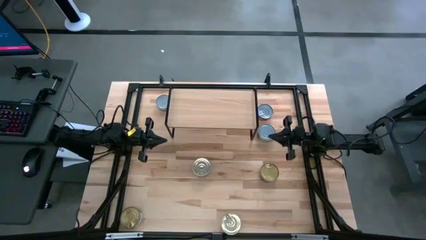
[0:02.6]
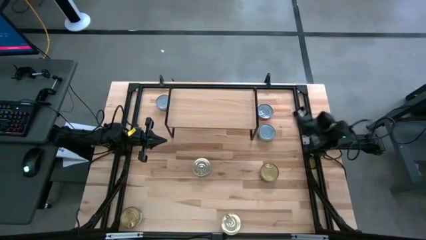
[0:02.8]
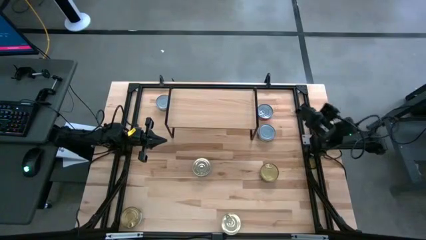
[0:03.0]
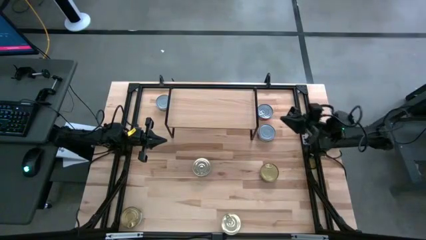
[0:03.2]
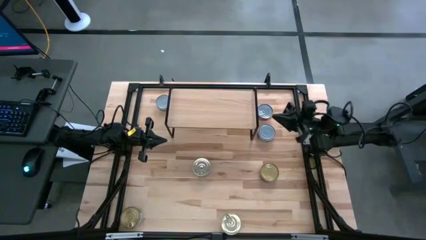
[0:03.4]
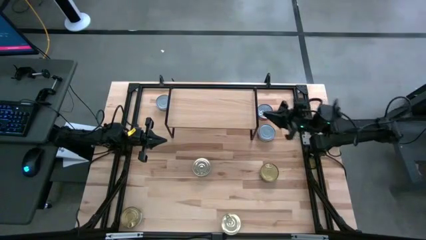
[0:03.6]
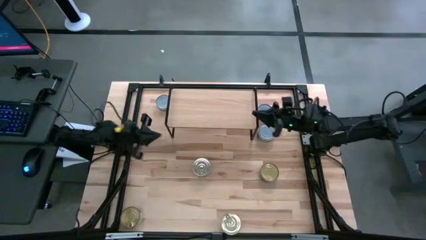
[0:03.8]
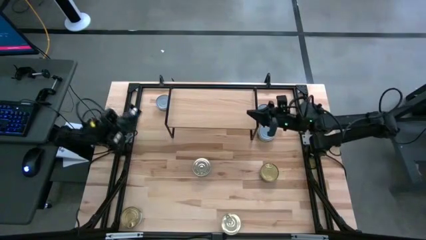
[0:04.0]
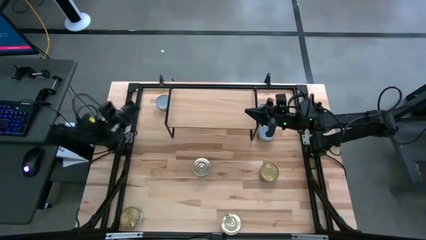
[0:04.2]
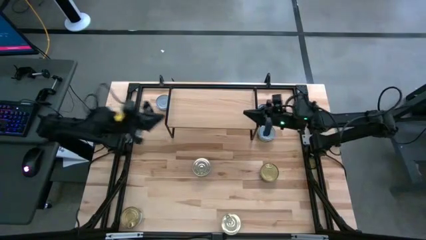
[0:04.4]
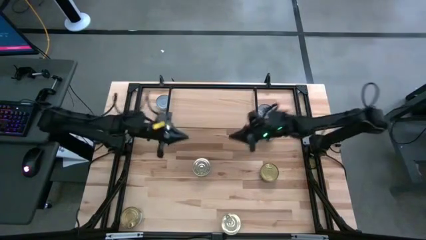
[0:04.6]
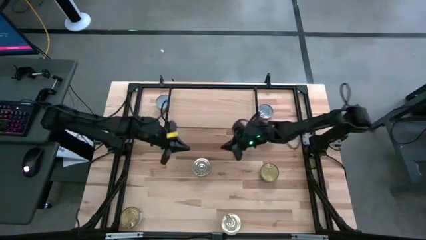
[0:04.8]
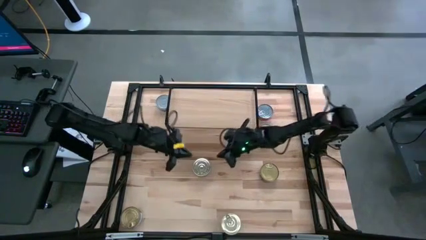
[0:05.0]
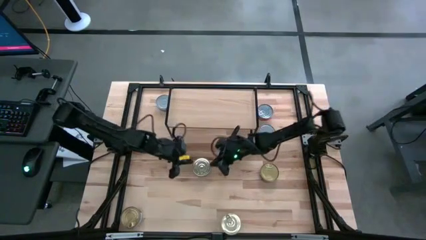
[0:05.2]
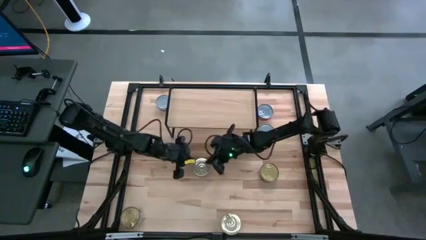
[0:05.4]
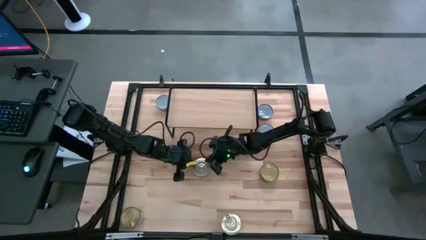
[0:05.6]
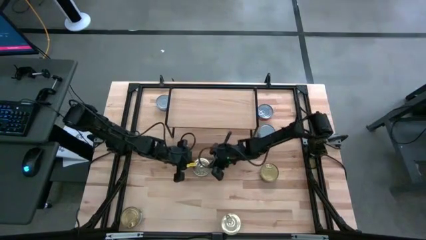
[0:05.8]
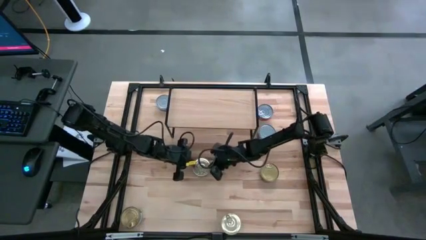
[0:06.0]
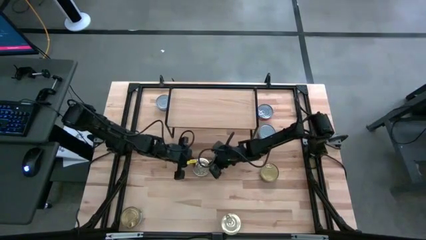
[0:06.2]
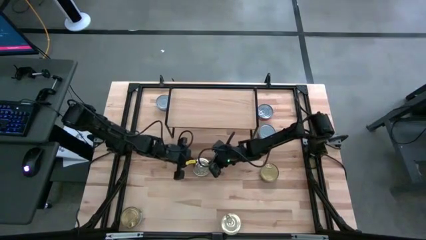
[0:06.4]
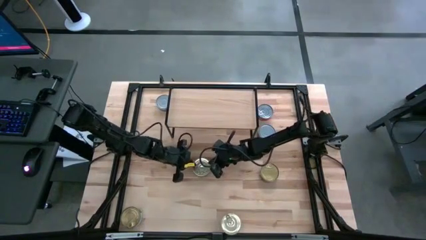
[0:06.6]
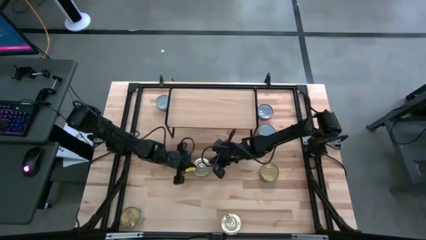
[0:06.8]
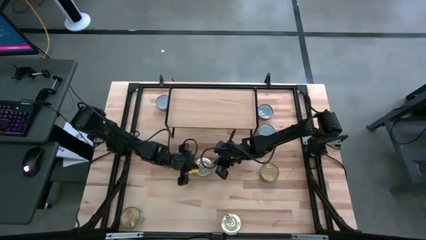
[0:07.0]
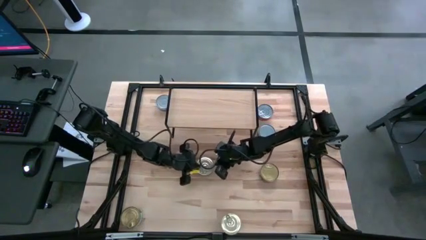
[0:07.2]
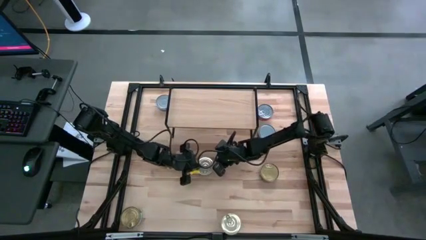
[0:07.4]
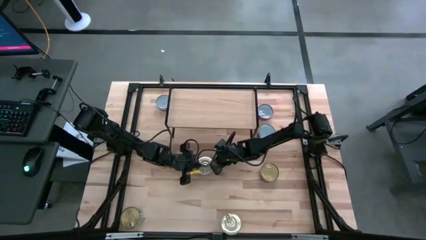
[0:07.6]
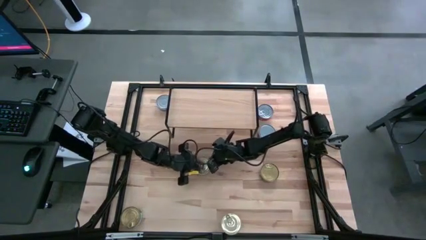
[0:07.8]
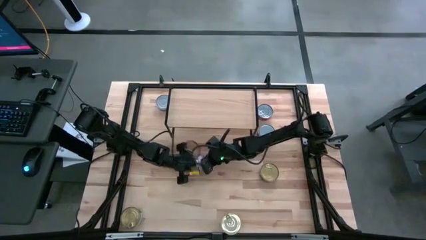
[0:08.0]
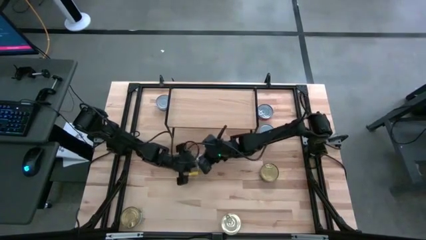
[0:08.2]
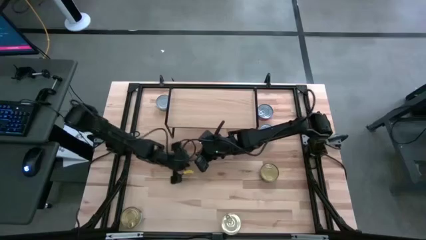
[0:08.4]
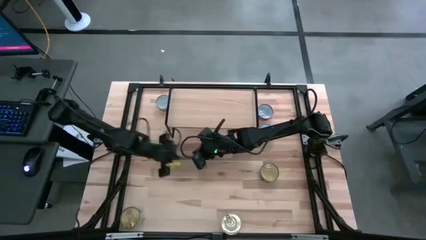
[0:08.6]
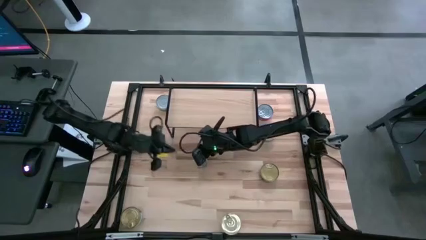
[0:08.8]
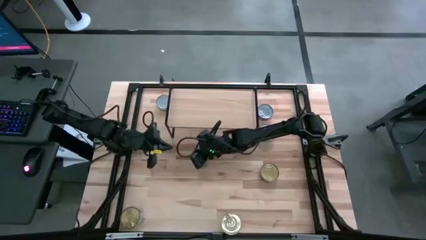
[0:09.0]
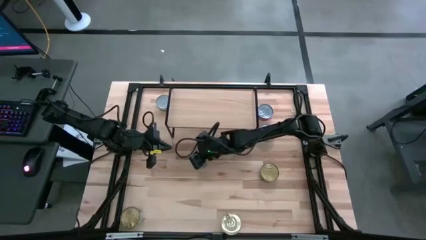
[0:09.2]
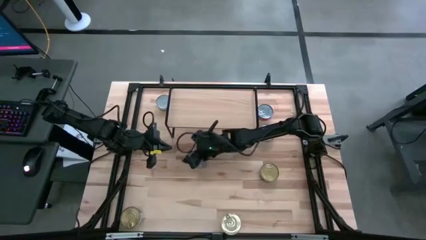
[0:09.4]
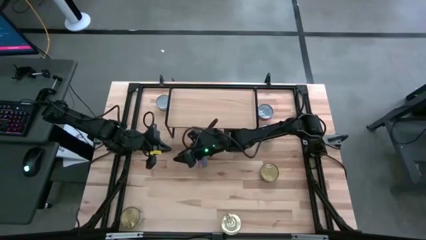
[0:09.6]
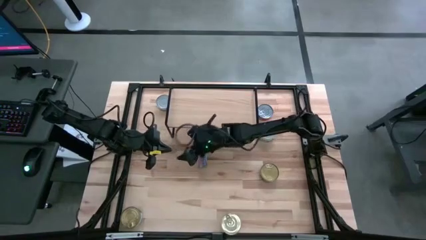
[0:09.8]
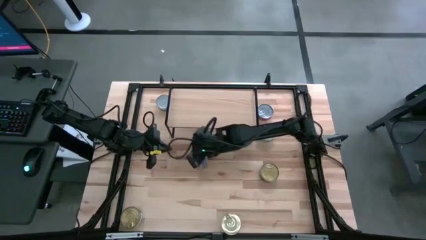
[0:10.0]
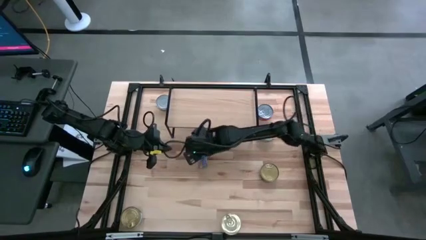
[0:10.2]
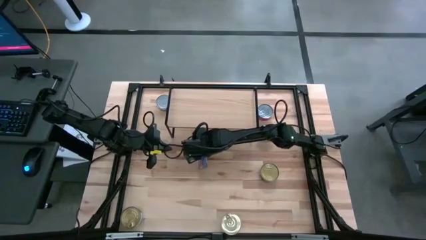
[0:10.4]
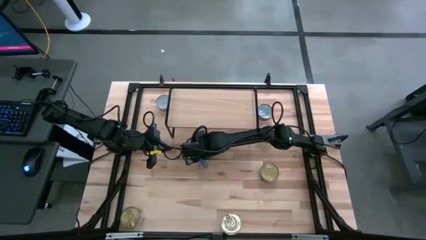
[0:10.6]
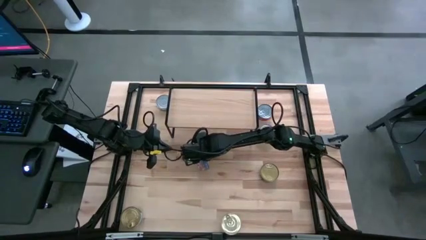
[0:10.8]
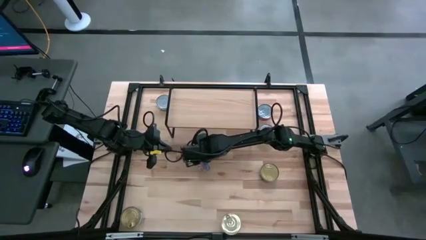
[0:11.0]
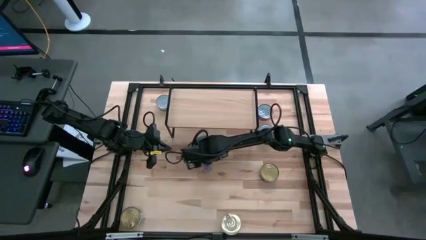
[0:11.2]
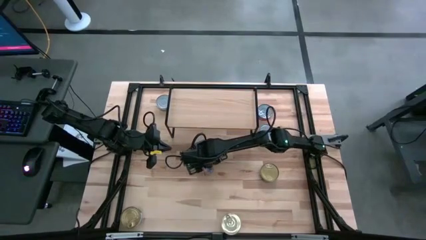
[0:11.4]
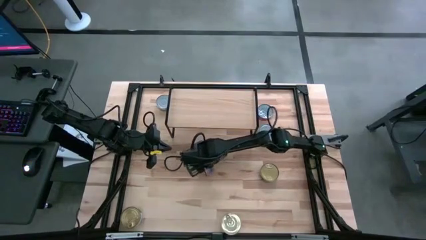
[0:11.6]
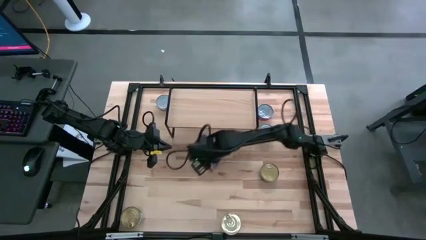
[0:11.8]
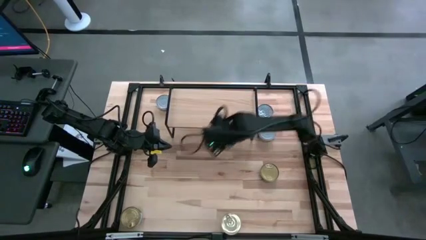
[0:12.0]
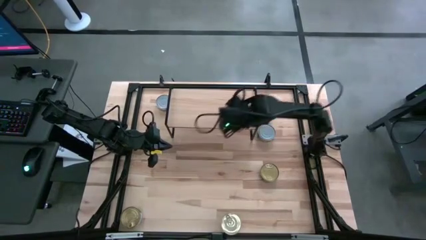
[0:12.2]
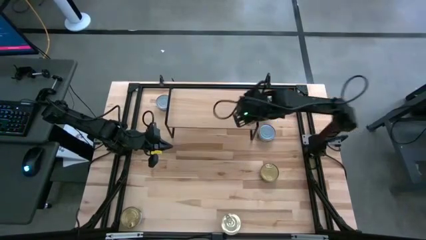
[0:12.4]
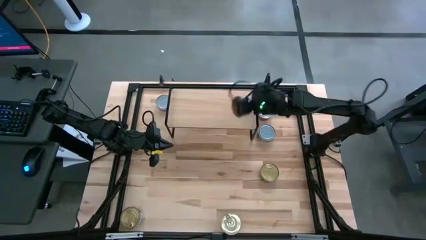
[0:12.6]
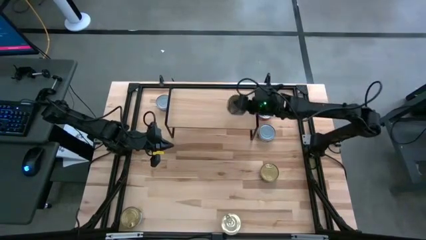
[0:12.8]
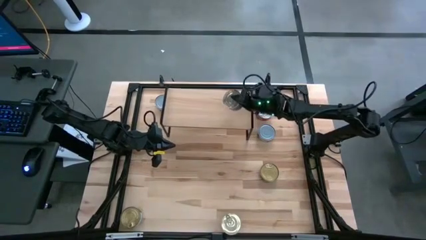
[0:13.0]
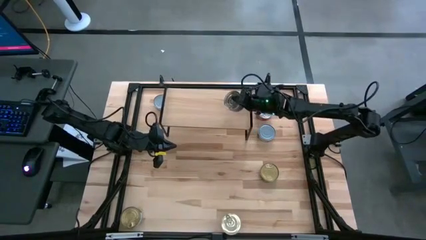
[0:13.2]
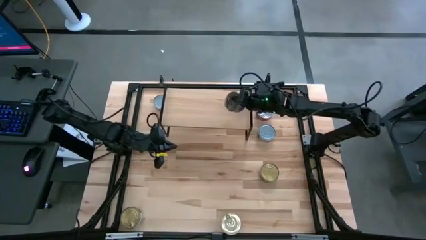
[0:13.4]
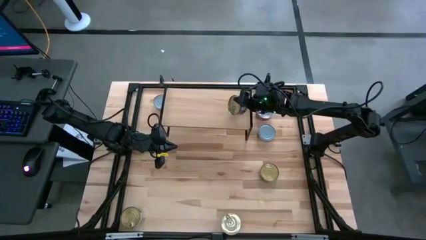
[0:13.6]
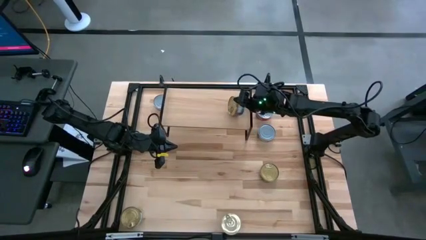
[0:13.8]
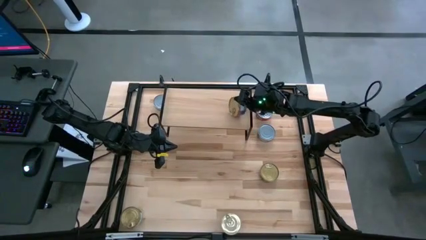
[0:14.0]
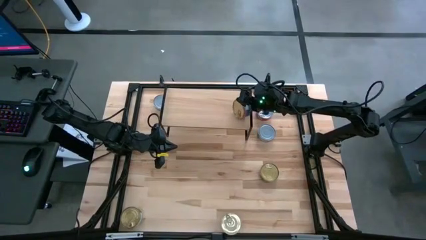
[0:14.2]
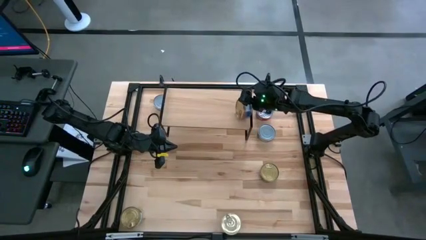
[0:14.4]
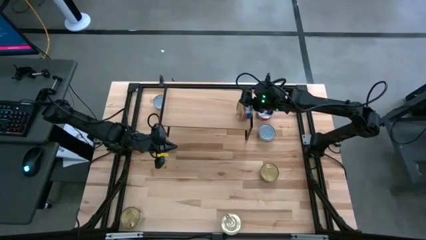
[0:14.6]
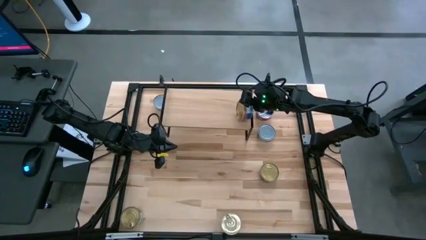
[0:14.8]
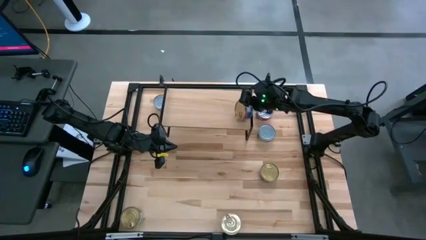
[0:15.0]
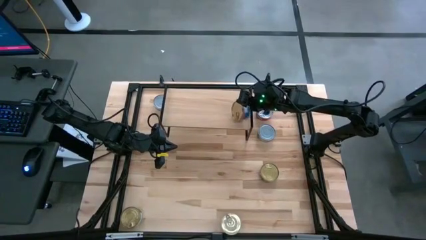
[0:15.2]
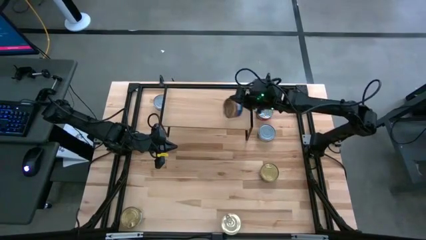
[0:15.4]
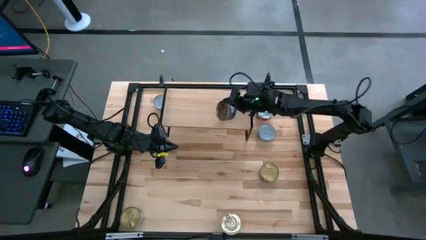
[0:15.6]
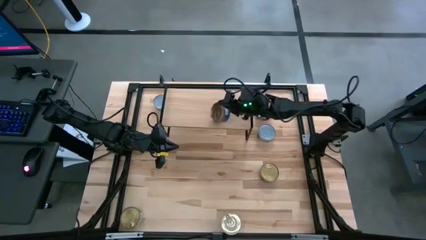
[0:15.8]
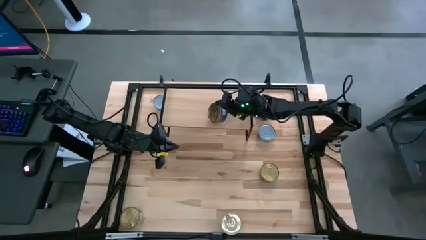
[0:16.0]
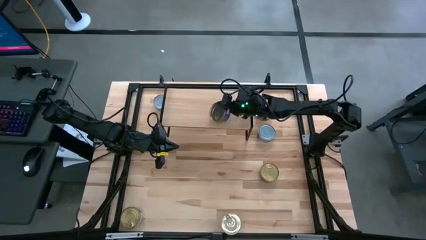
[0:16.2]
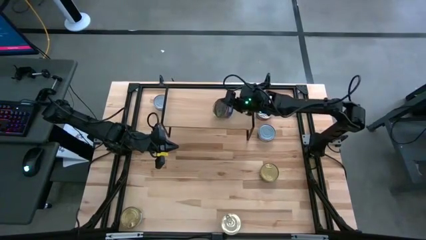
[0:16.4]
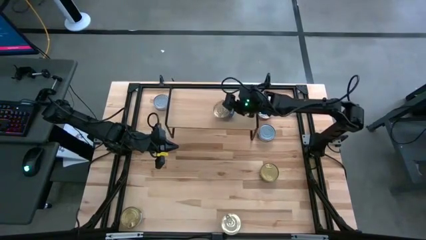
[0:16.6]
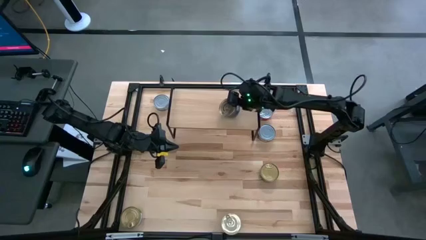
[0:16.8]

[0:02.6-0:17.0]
Task: Stack canned seafood by type on shelf
Put the top blue pink tuna can on the shelf

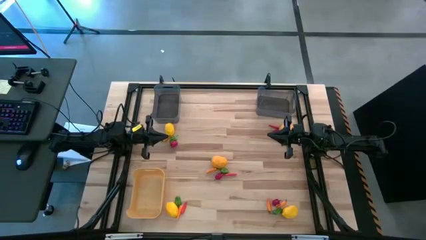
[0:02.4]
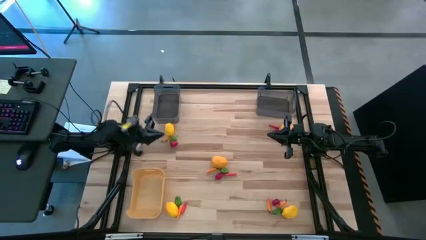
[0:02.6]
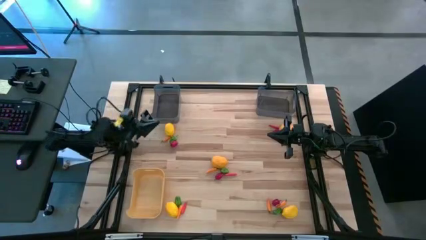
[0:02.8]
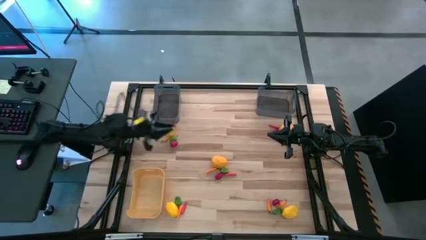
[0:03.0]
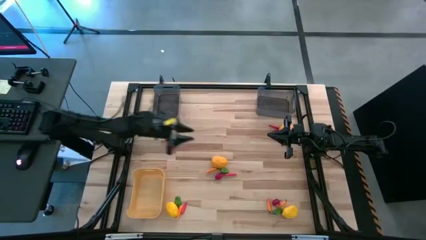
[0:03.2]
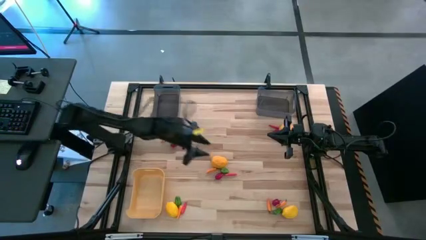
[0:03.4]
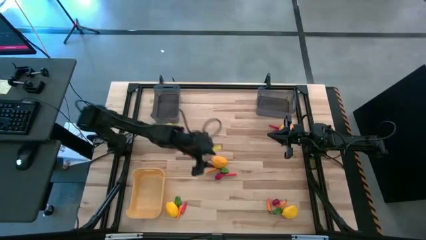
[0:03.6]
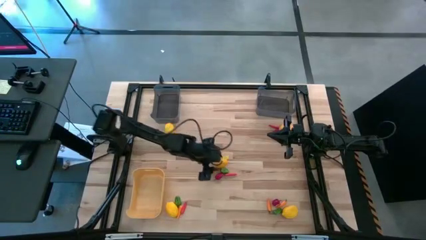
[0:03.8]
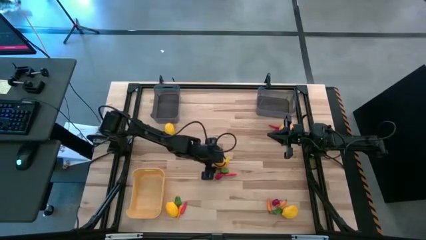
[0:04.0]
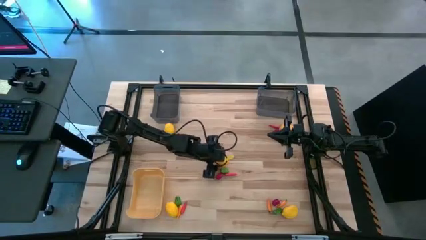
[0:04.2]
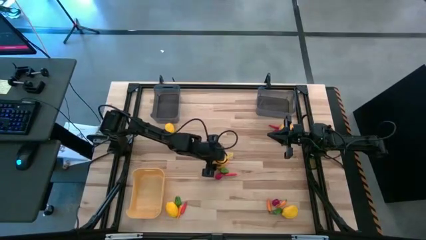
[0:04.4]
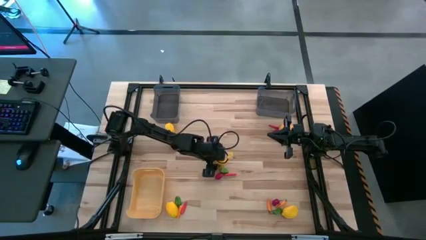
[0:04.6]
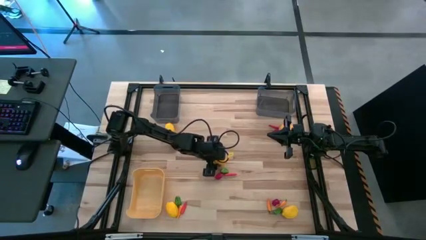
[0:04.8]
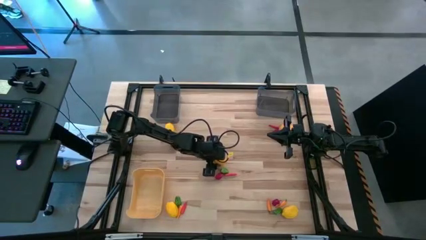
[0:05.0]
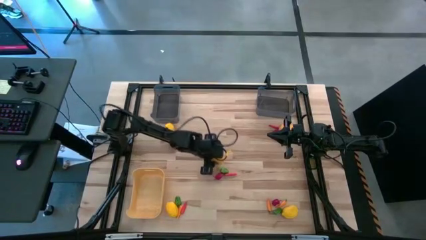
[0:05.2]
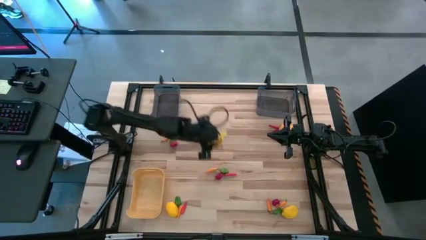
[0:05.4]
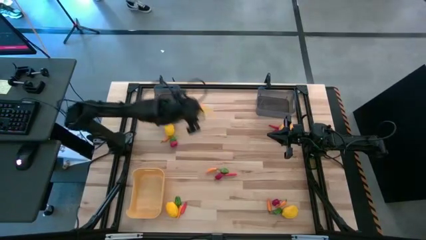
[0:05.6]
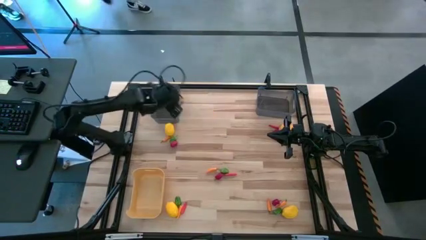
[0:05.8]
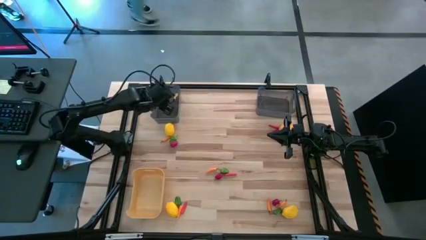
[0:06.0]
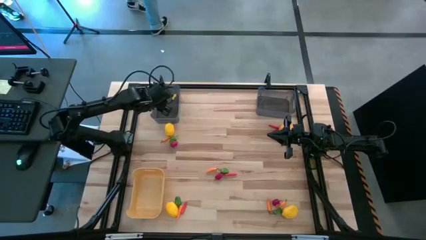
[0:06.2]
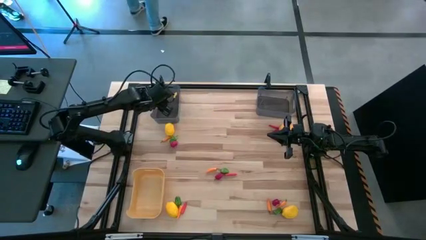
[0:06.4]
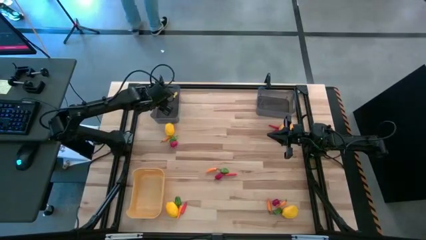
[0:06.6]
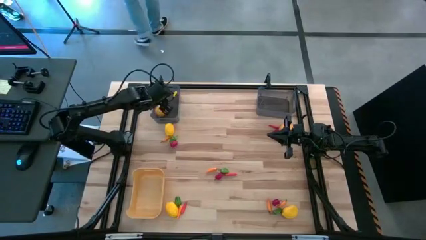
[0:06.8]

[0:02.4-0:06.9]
Task: Sort produce into baskets
Put the center yellow lemon into the left black bin
